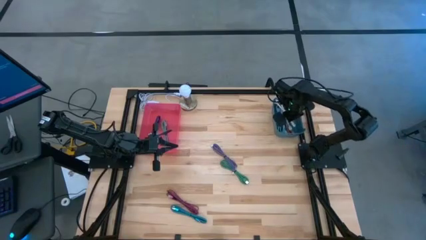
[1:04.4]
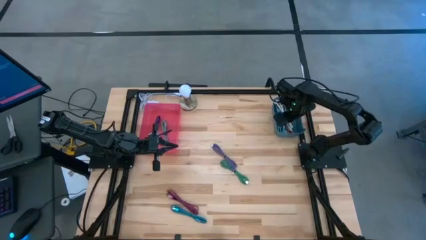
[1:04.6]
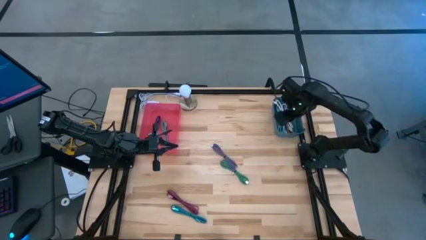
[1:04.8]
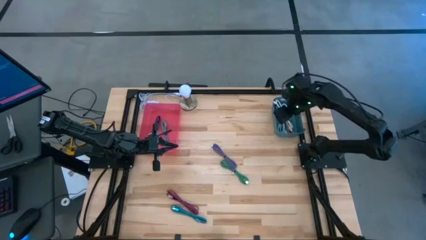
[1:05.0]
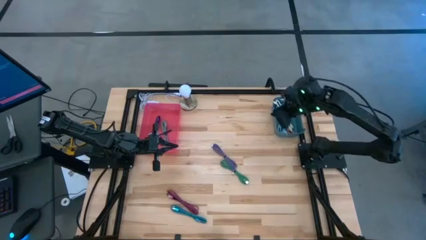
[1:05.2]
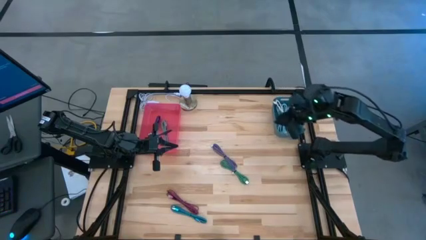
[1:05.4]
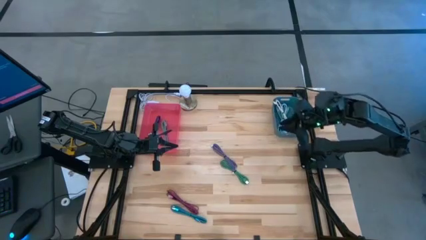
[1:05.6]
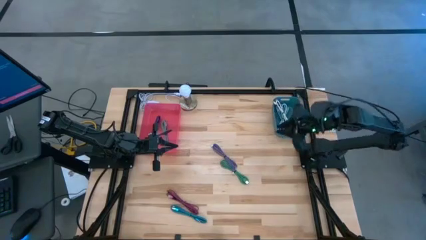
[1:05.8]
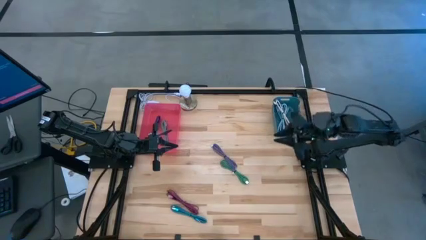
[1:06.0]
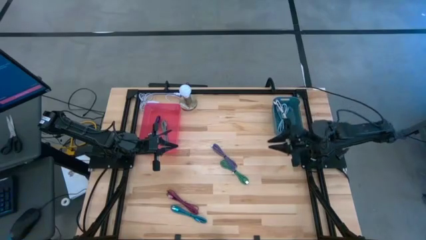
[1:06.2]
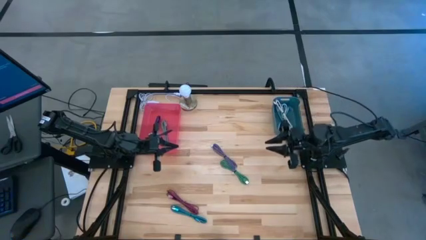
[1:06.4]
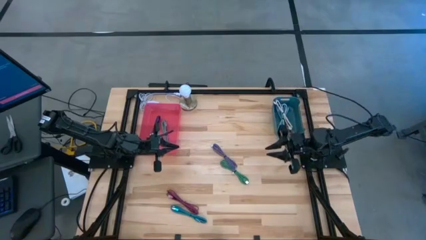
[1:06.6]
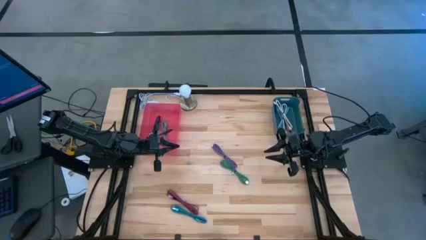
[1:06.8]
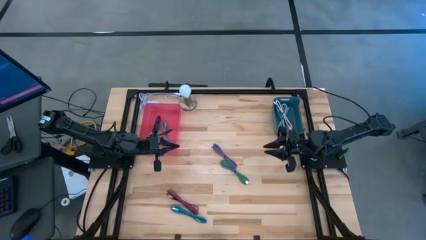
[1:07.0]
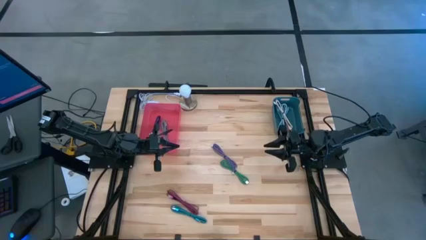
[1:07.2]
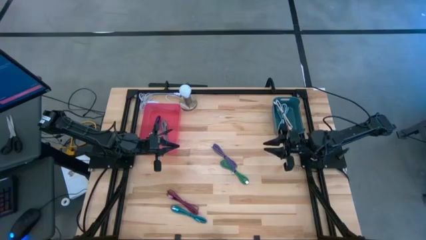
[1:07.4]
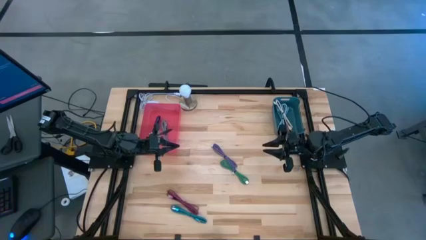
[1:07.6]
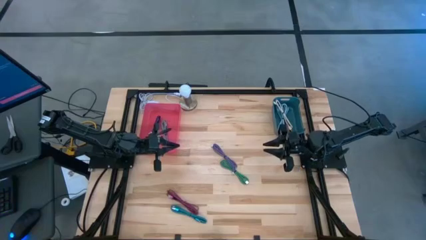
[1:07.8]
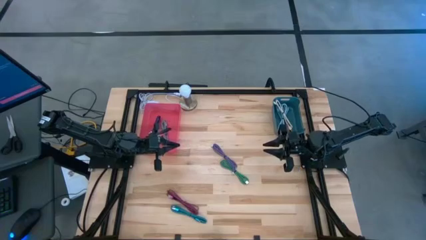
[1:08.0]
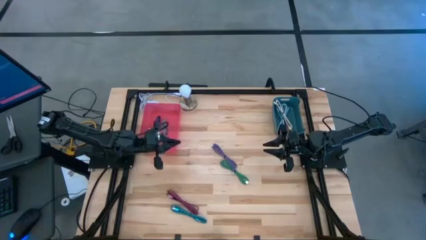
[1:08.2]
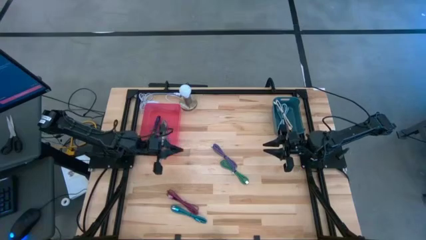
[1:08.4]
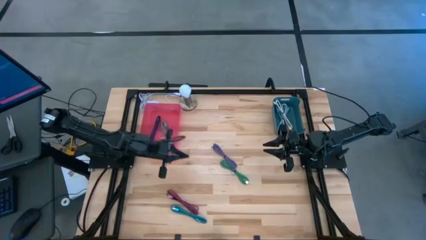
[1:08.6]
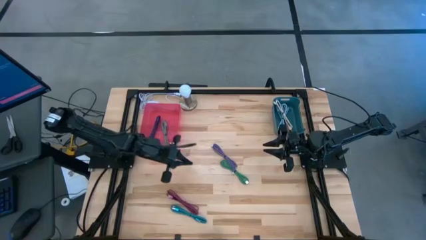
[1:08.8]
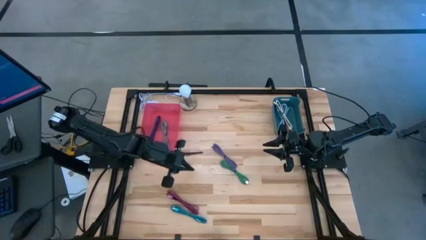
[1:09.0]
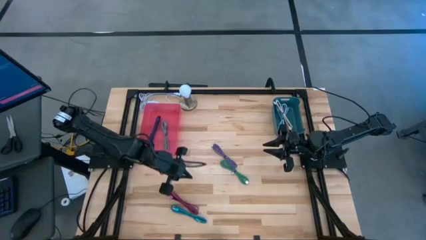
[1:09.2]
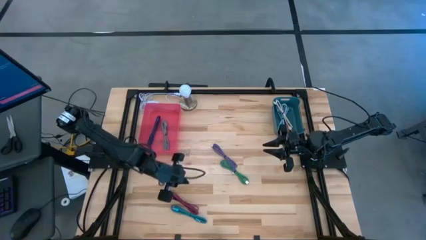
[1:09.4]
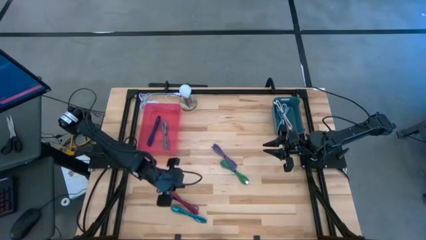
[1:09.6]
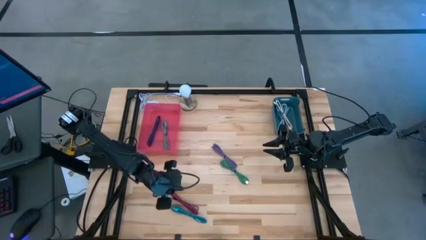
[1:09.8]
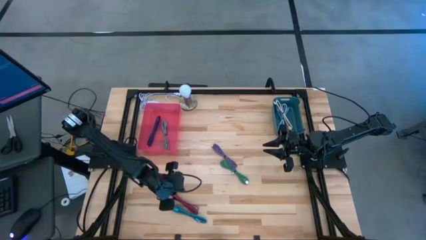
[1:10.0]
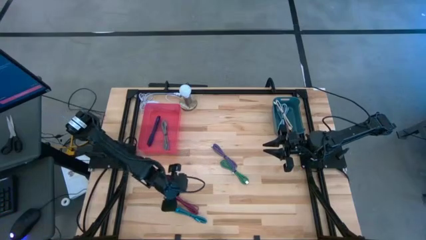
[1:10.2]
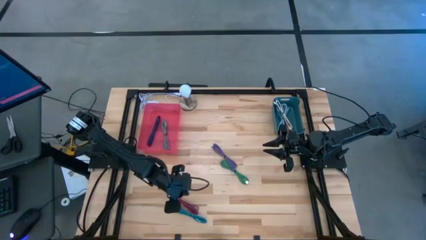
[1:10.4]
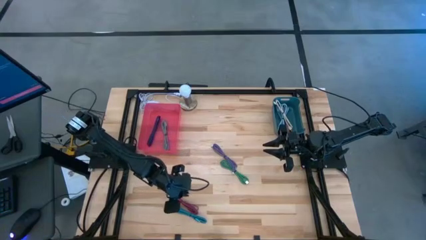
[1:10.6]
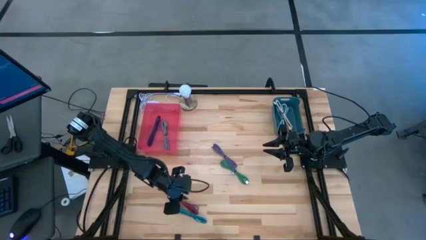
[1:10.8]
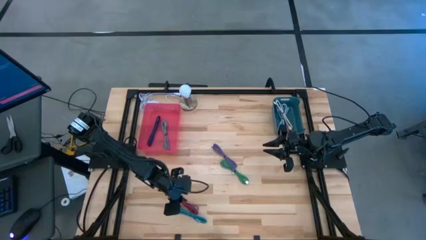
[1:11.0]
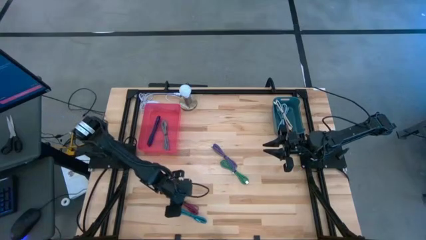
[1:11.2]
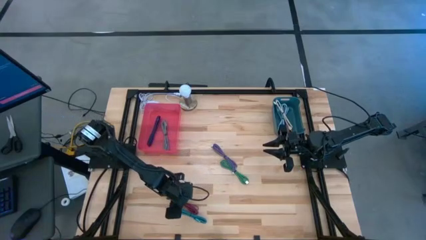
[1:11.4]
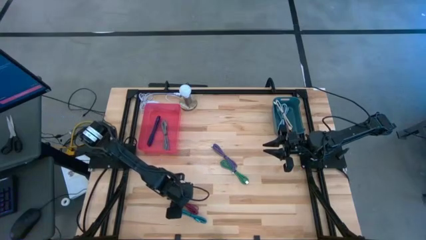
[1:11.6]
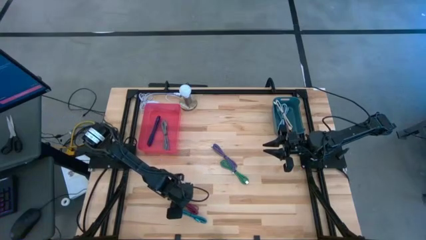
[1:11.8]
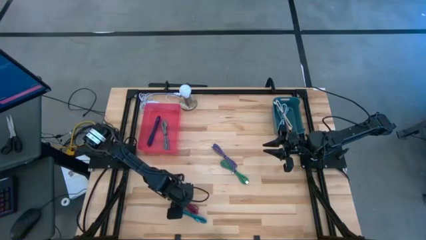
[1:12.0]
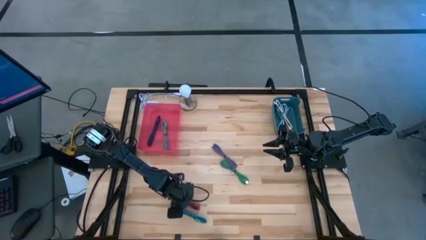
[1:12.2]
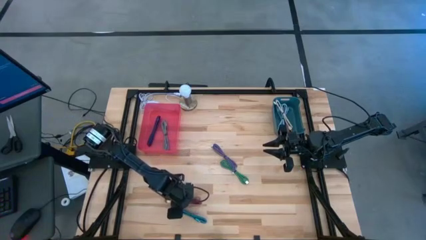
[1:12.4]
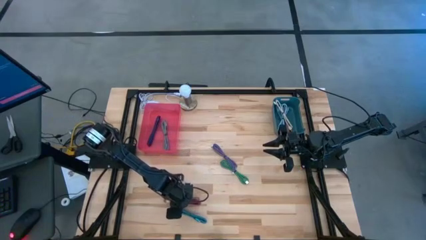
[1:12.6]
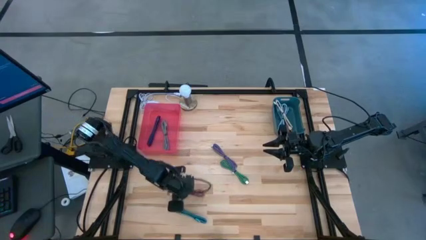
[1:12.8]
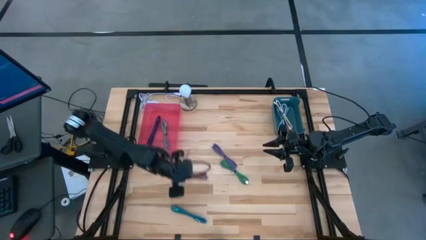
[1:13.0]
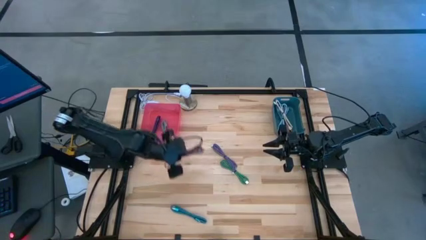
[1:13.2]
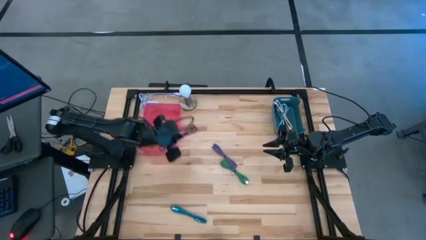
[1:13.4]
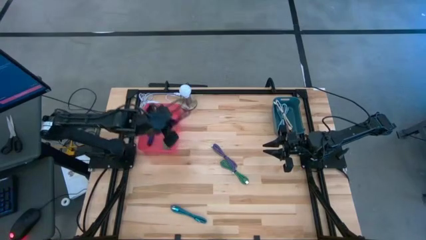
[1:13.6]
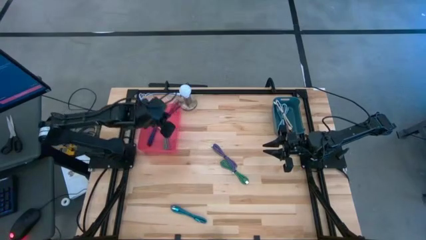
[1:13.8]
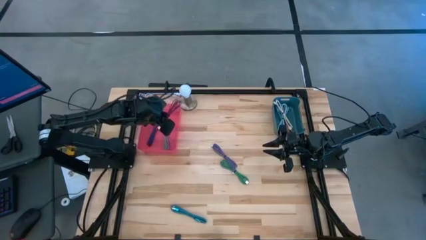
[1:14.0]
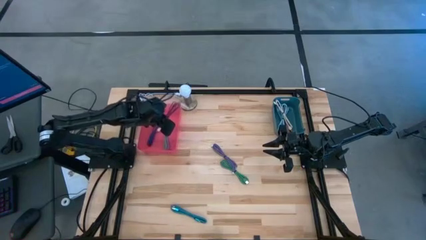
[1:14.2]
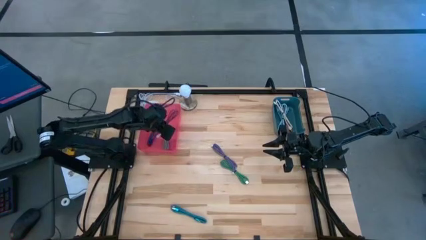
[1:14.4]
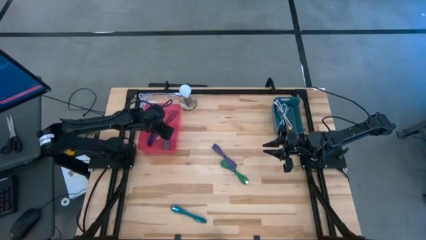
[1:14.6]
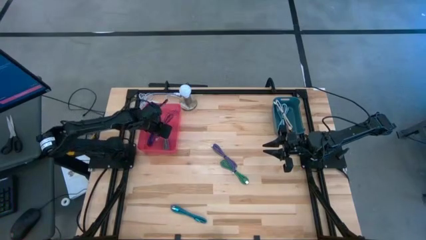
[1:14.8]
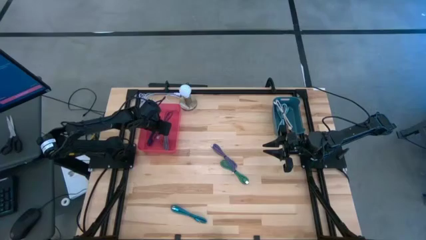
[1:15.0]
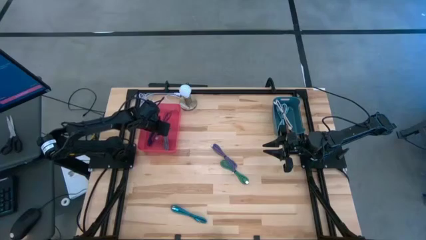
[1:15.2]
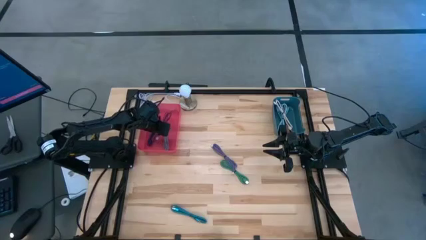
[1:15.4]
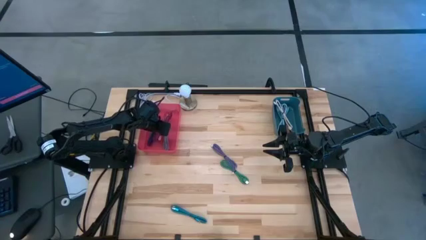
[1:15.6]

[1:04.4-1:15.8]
Task: Pick & Place USB Port
Put the pink patterned charger cable into the pink bin

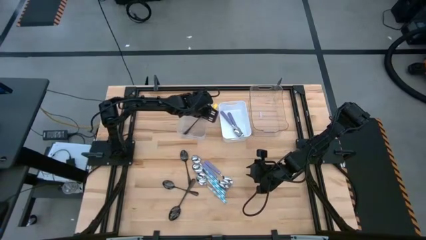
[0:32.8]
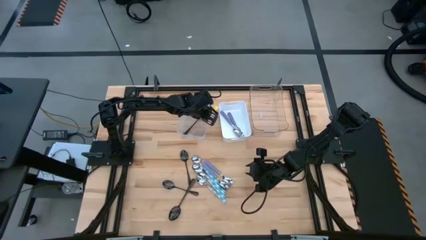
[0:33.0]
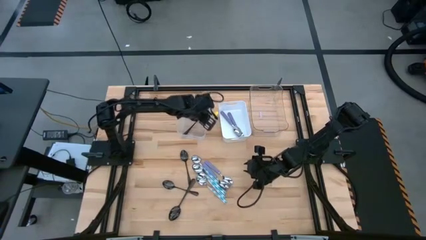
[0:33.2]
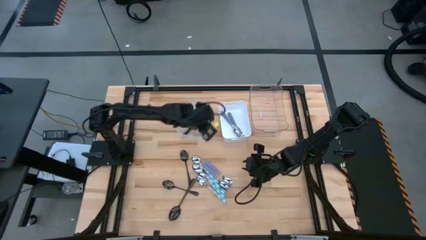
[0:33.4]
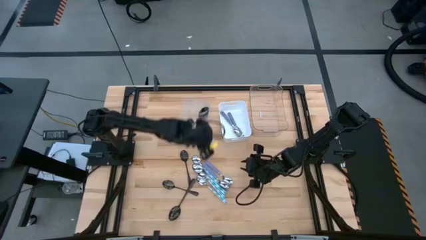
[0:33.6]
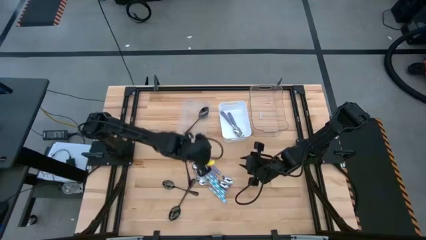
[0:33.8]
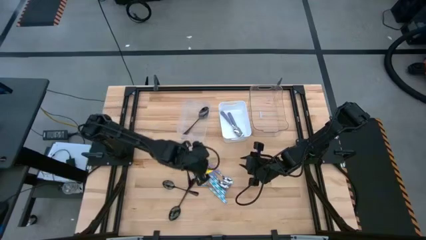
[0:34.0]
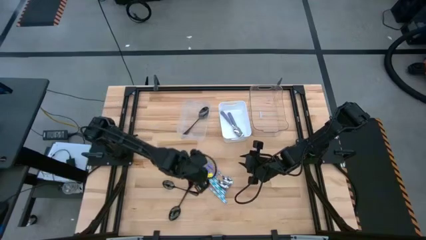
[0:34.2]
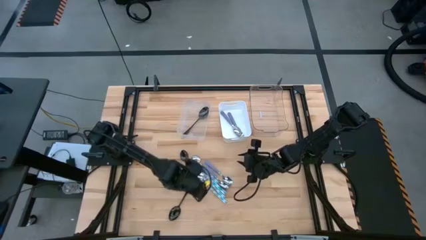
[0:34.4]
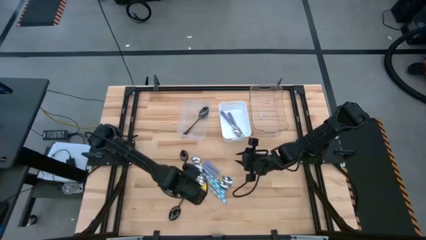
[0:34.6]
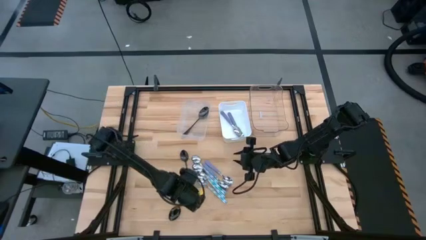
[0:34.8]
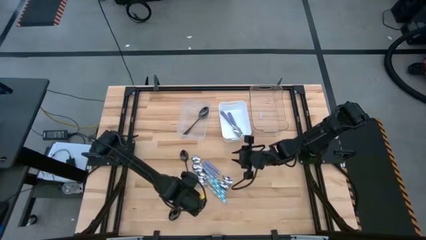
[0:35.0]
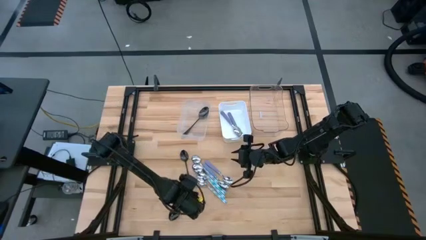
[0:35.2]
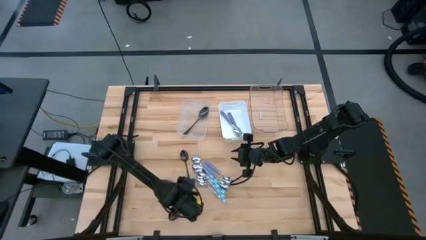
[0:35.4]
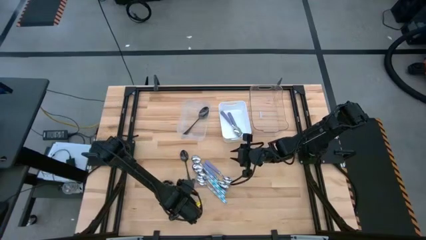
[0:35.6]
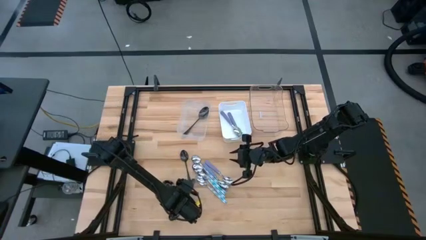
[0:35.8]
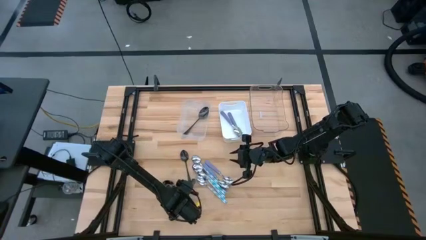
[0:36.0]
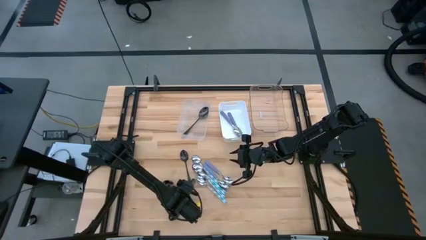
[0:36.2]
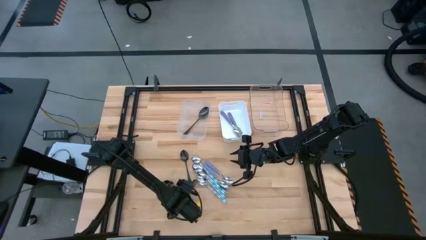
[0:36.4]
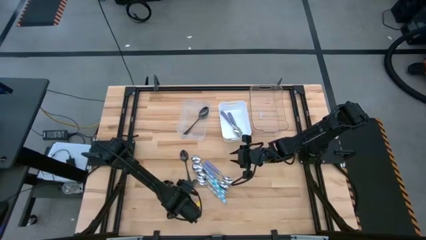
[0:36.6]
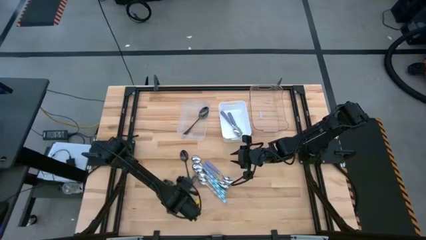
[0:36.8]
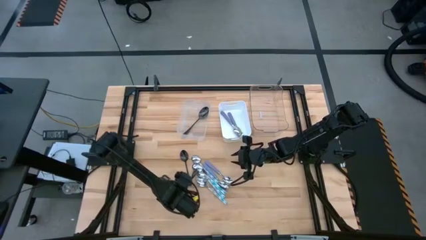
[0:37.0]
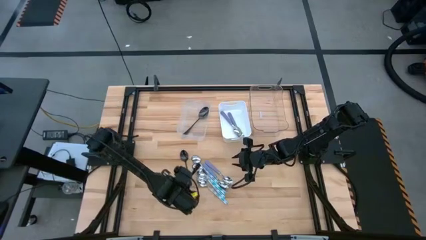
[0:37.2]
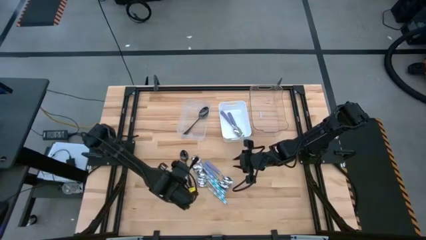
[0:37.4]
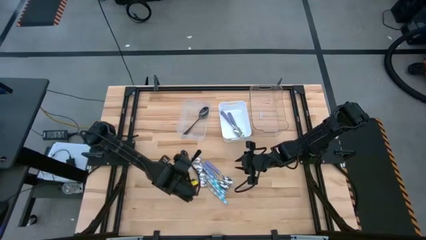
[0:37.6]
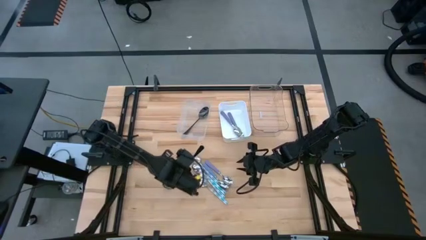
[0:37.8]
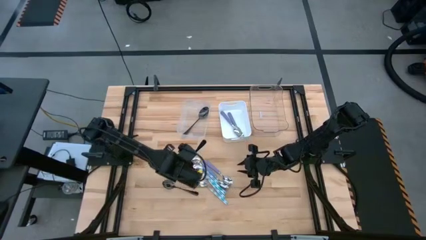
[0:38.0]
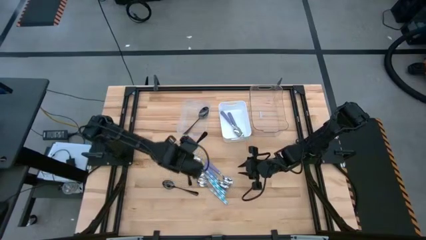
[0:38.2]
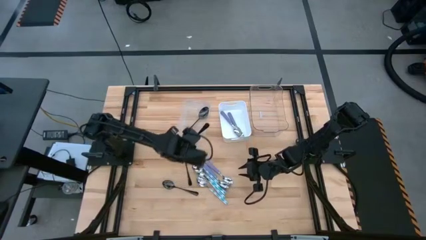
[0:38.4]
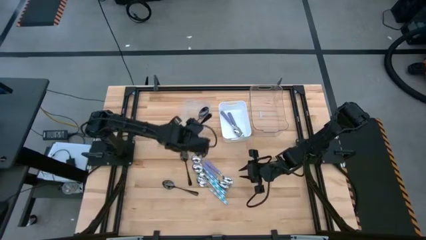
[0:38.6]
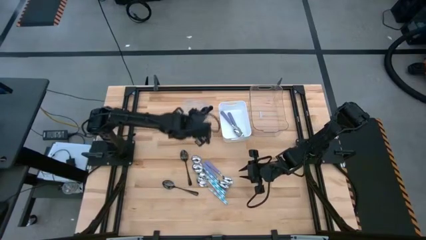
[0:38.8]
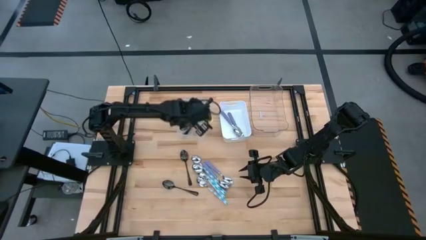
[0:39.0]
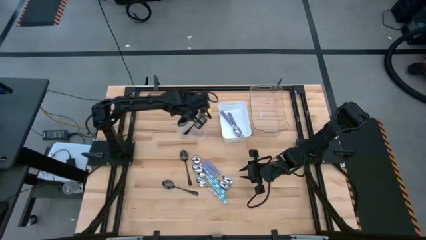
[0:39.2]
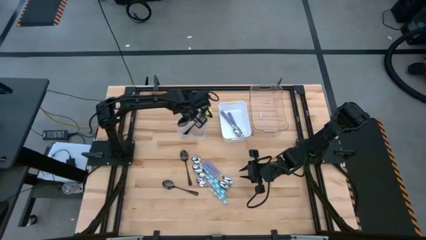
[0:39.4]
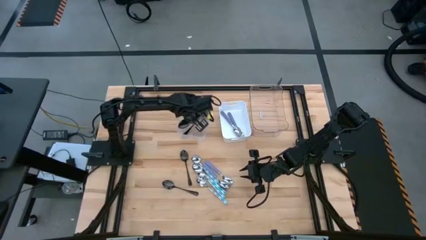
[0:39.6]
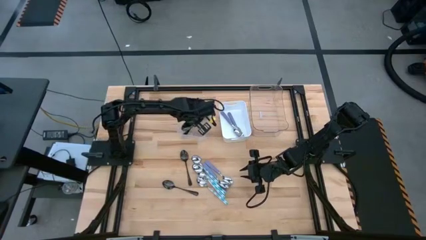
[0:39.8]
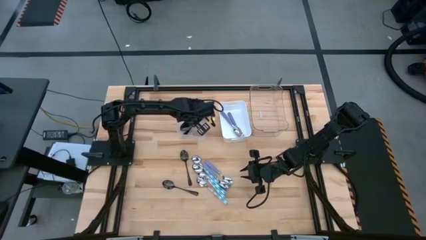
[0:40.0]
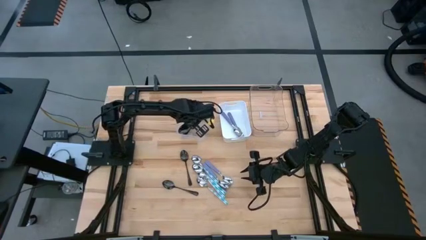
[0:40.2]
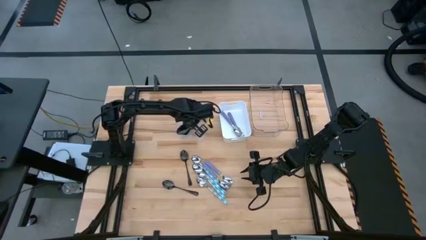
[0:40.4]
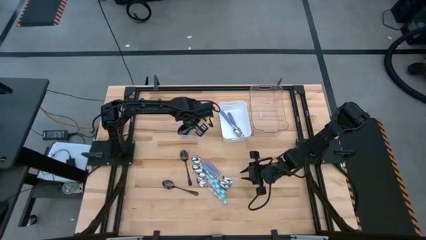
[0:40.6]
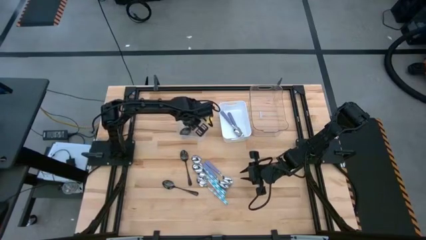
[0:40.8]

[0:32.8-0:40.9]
Task: Sort silverware by color (type)
Put the black spoon into the left transparent bin
